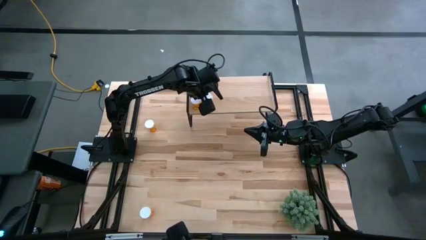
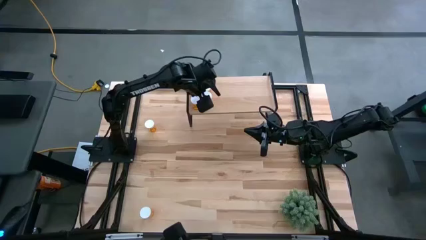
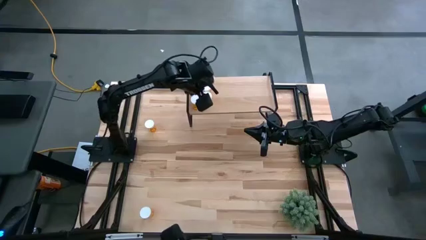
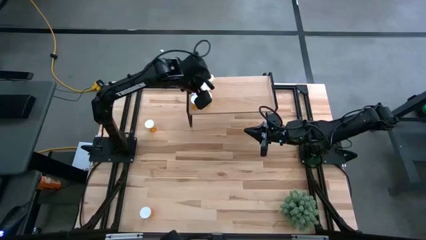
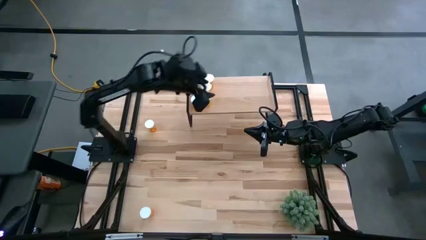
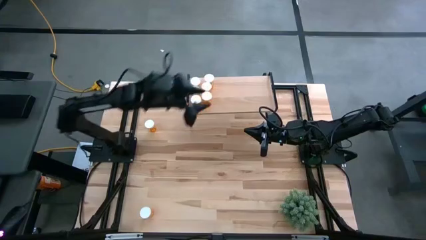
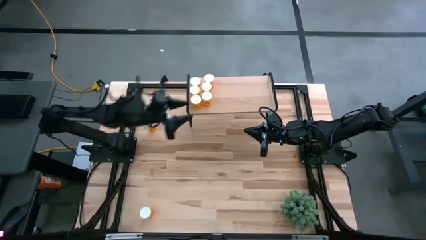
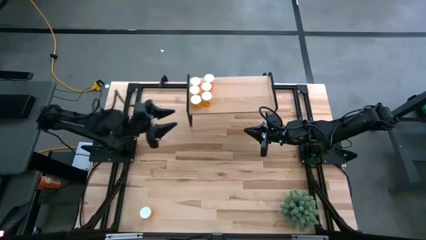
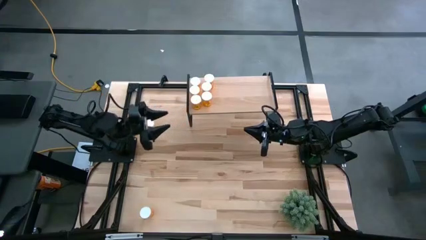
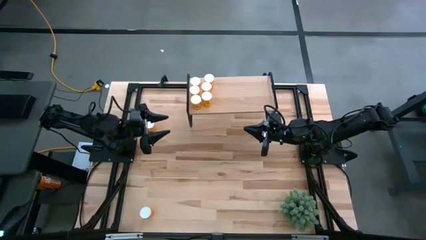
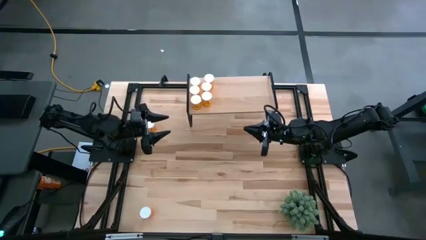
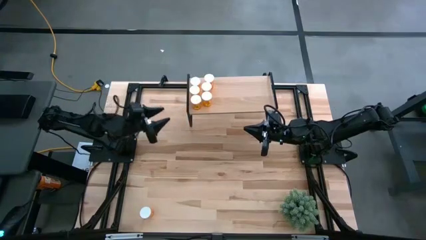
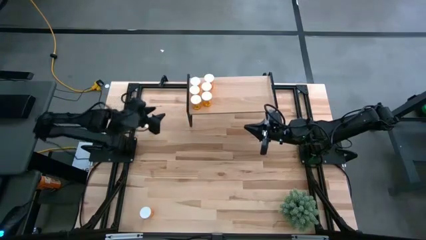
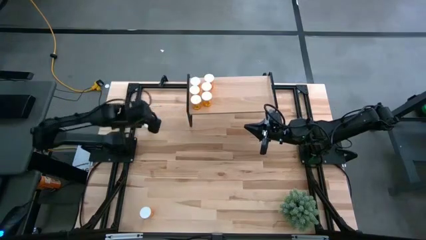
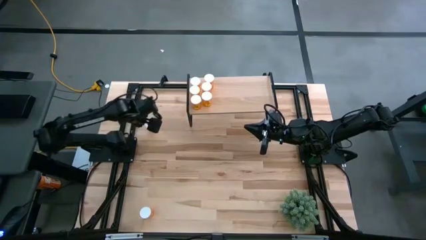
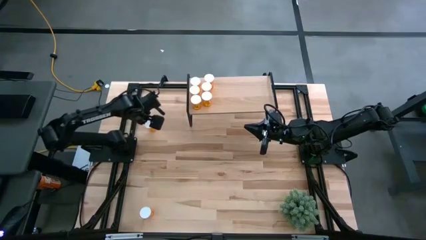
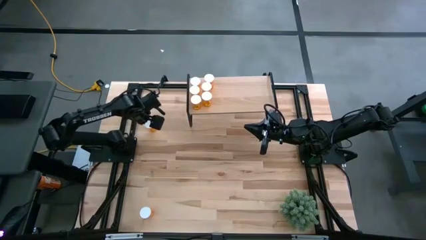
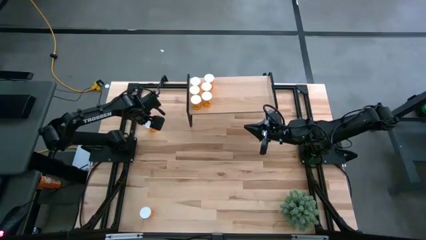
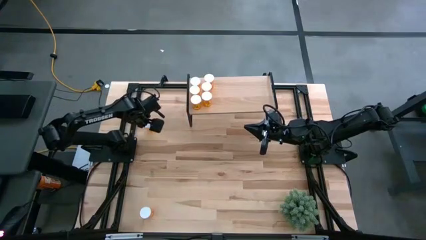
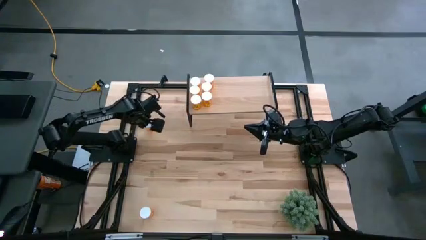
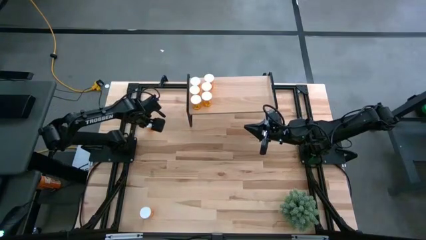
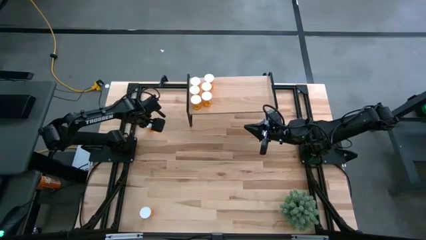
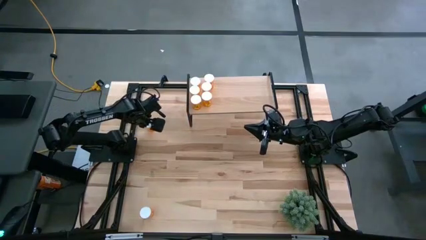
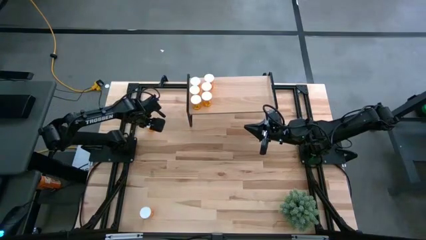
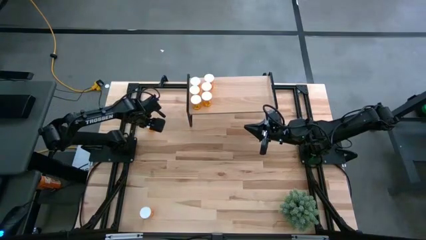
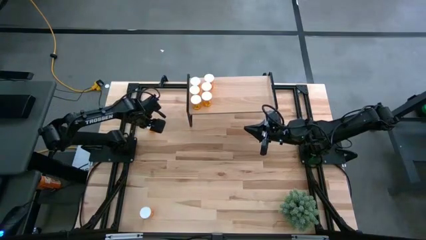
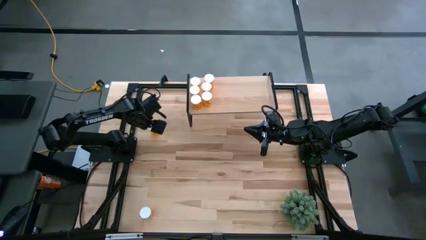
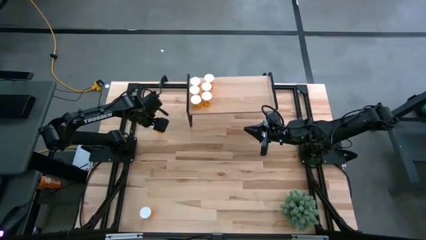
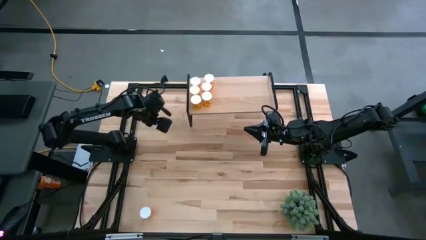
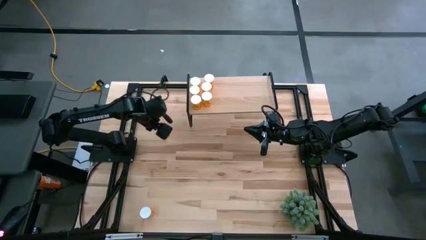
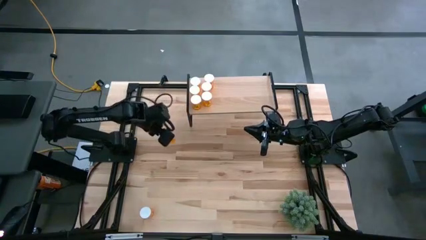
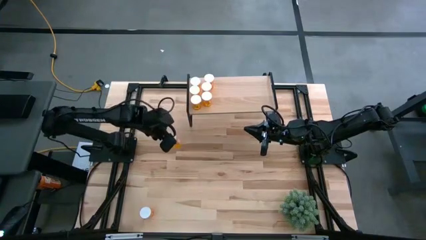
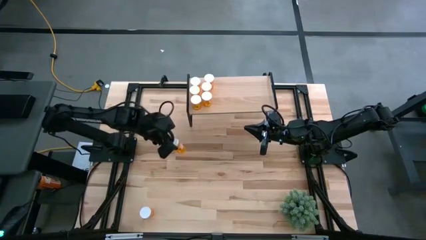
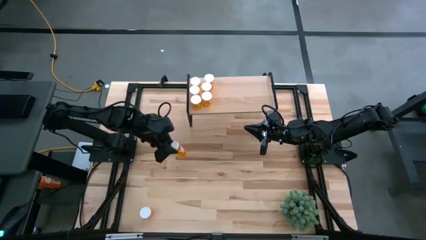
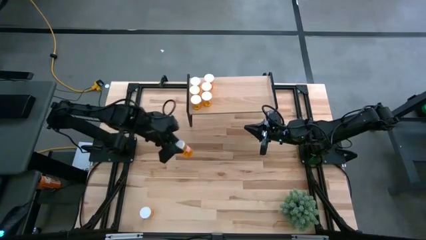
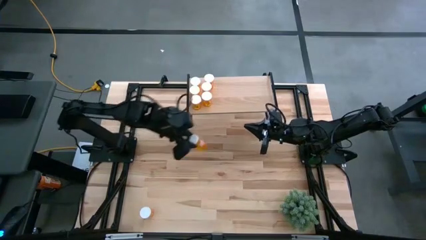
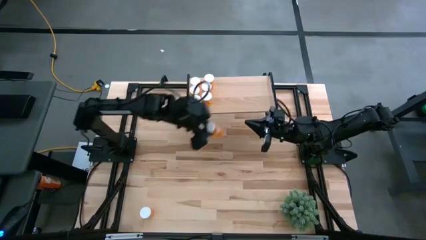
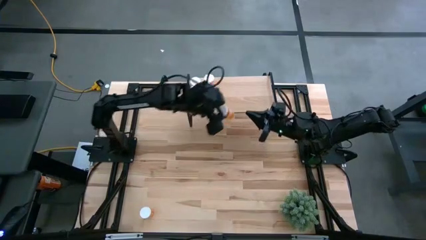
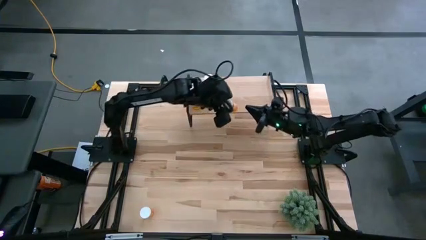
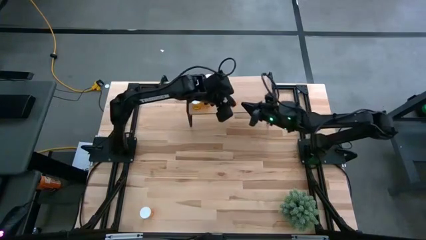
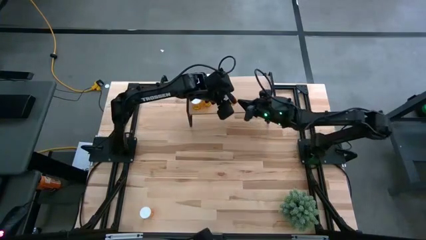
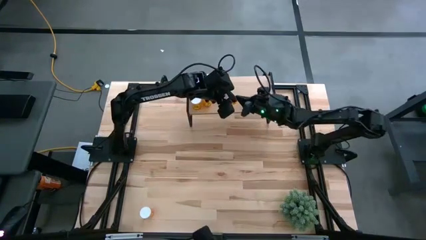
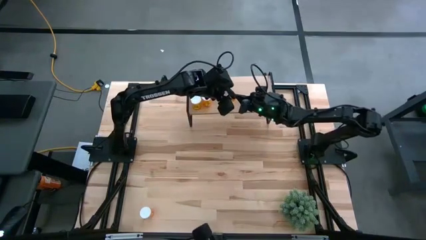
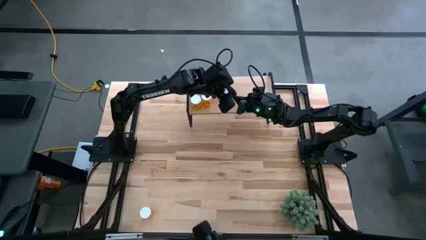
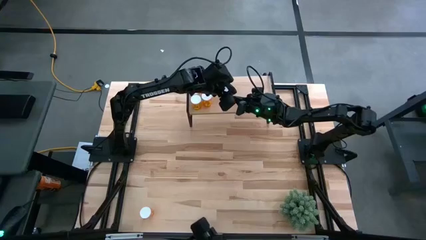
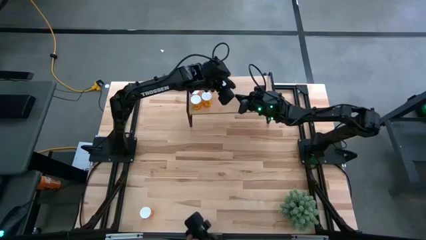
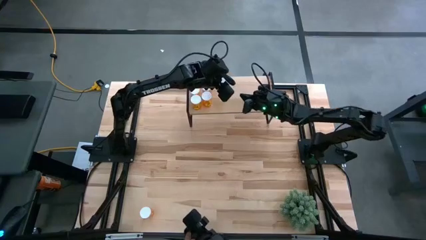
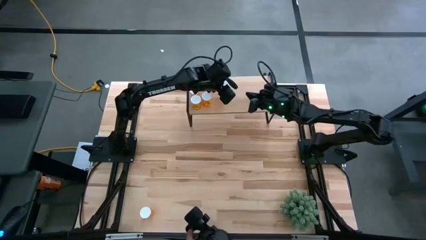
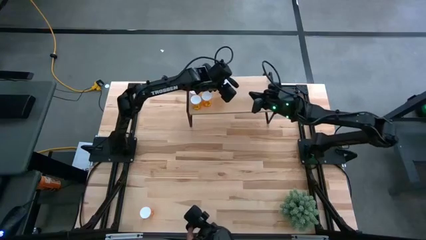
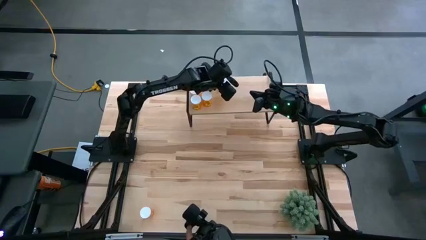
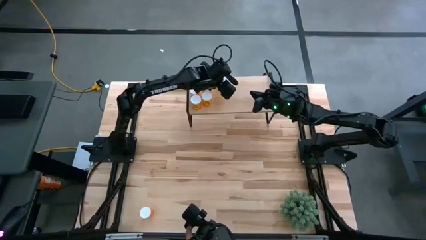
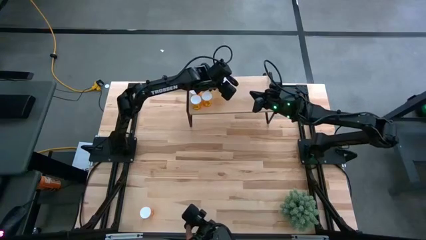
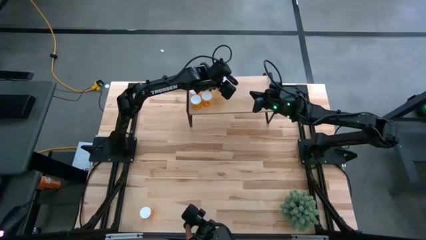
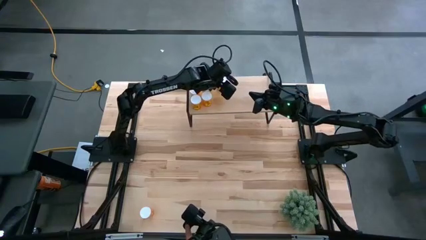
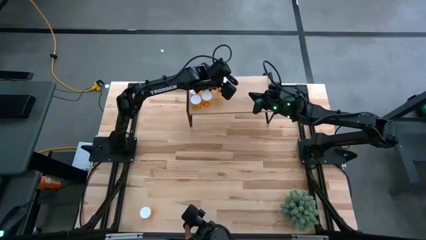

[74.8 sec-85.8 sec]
Task: Pick and place medicine bottles onto shelf by color
Put the orange pill bottle on the shelf

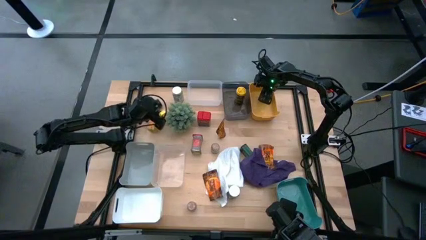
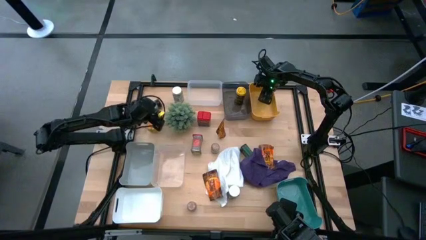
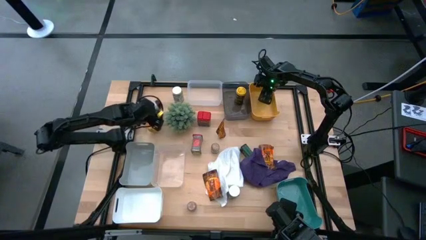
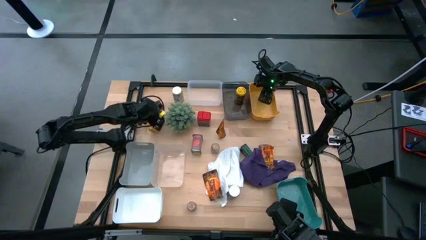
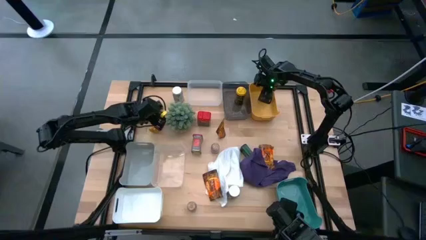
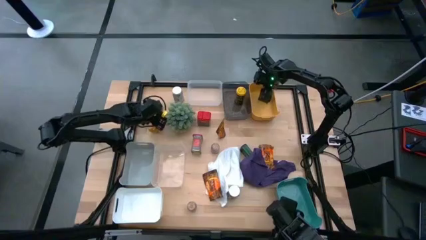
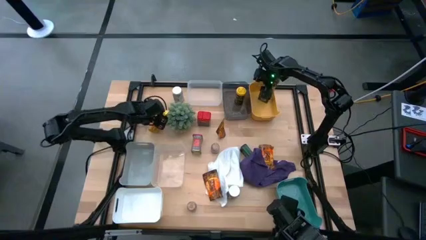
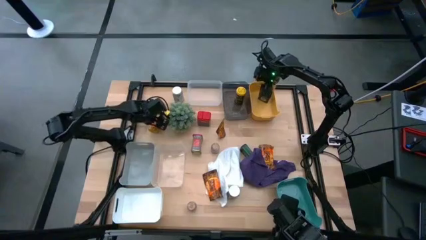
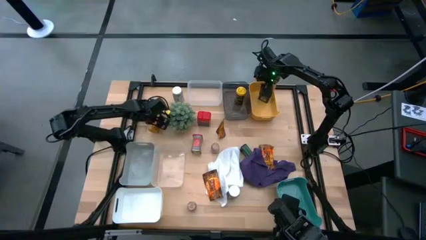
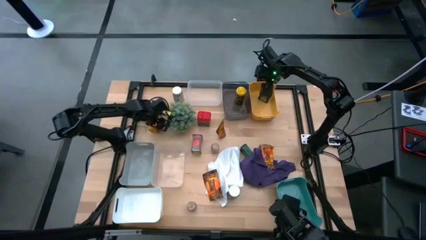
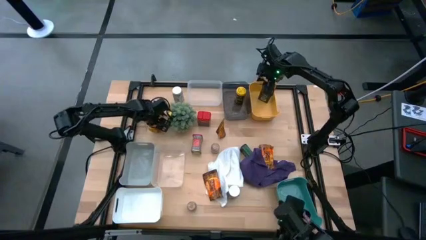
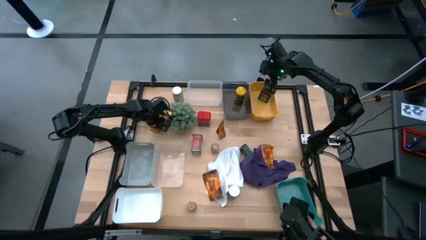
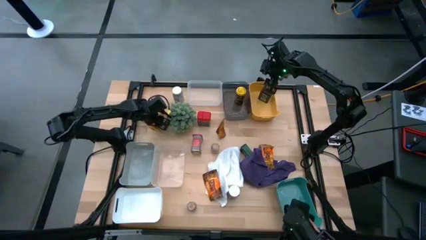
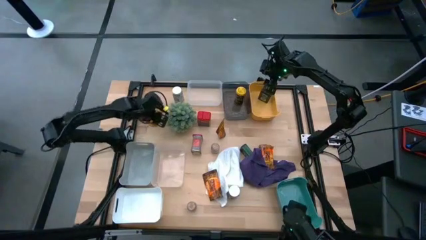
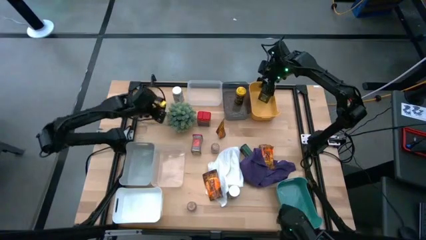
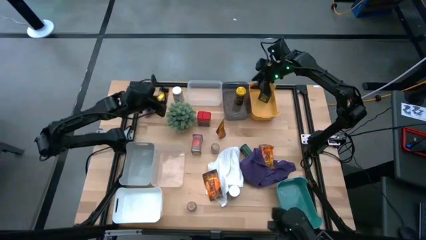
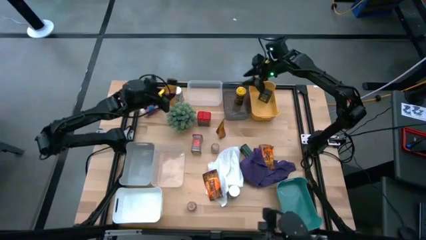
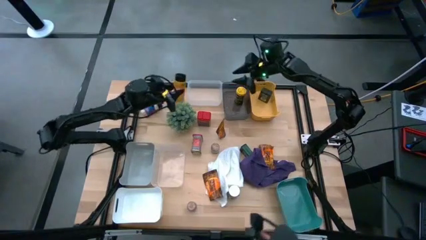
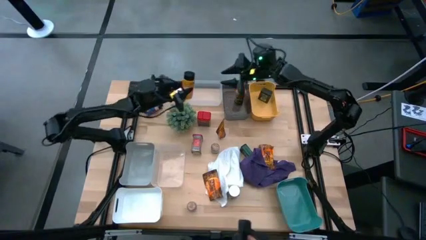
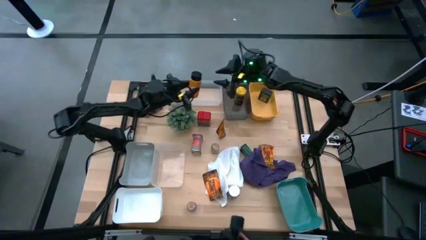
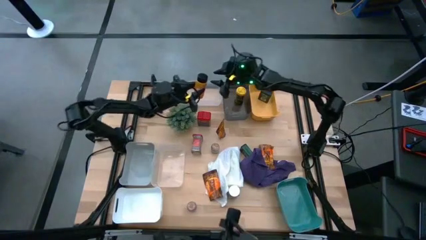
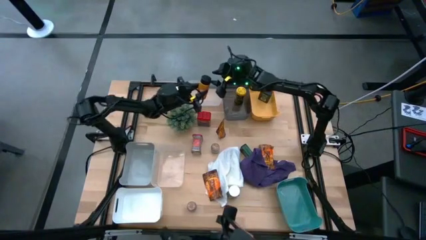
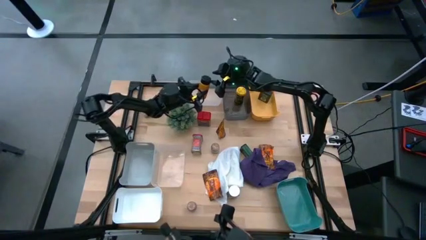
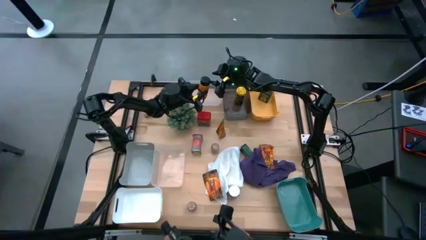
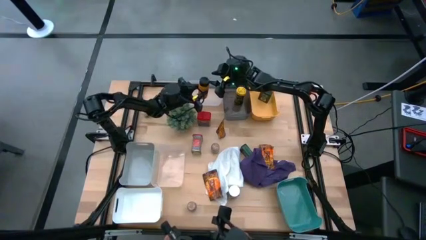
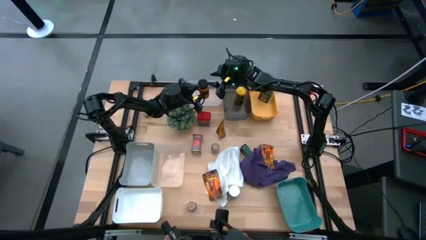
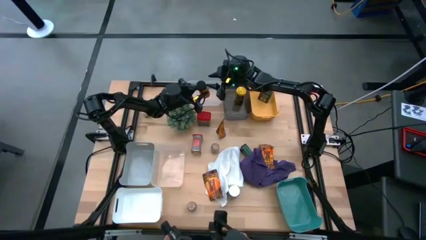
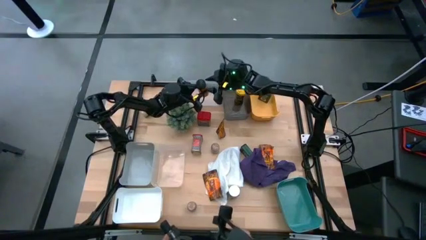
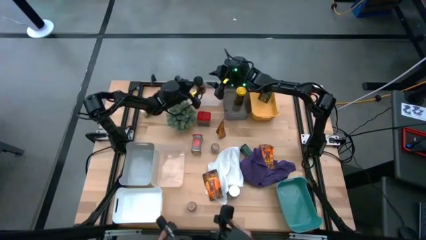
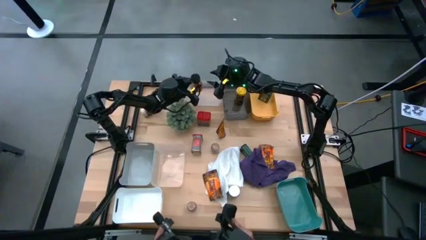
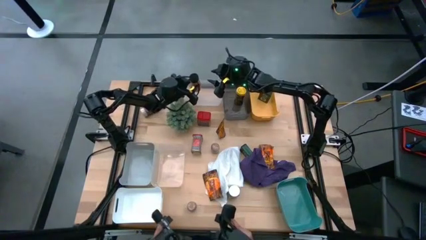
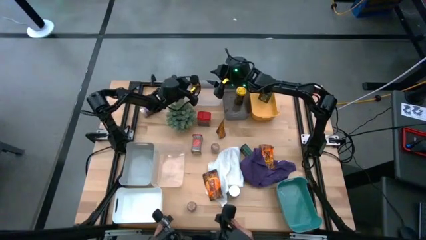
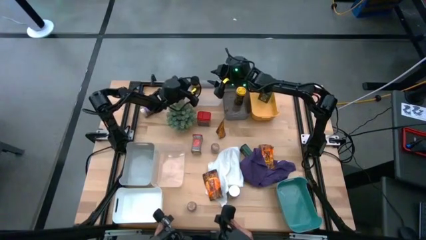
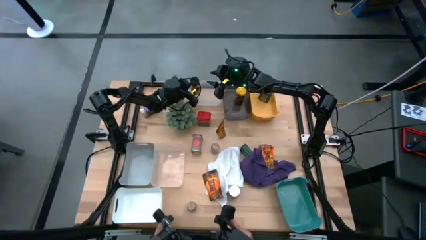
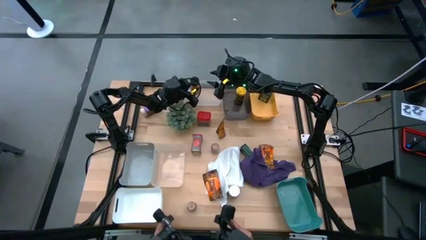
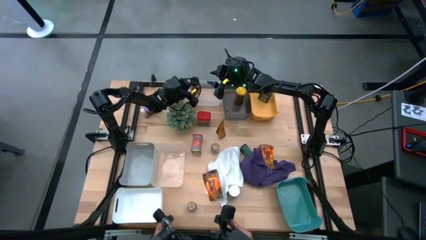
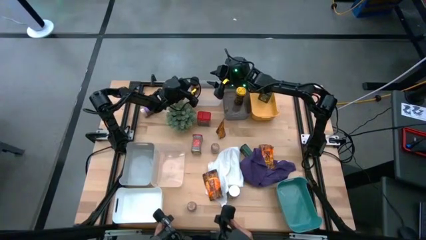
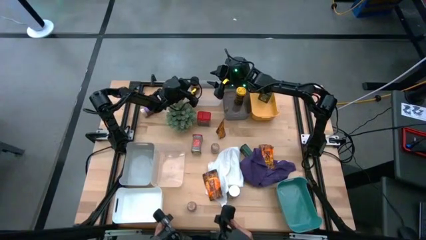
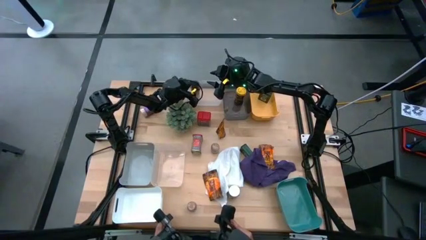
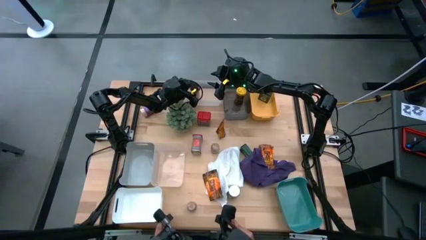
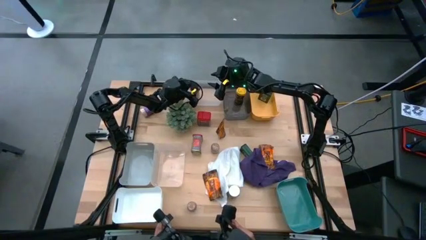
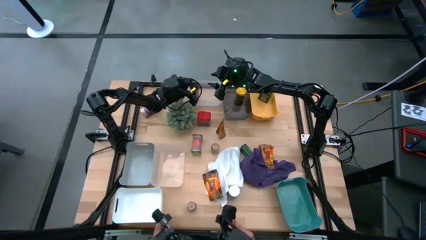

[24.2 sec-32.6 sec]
Task: Sort spices by type
Put the orange seasoning bottle into the top transparent bin
